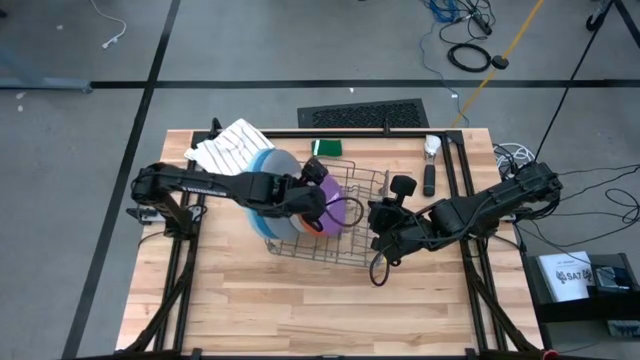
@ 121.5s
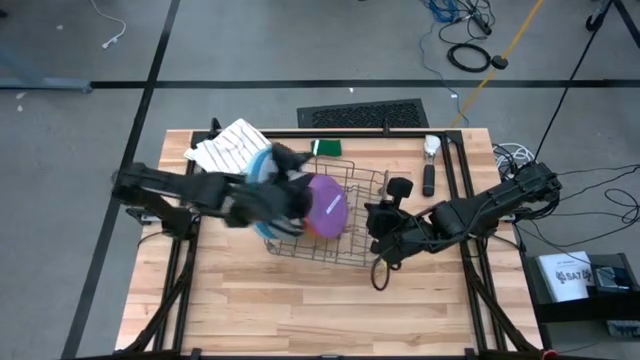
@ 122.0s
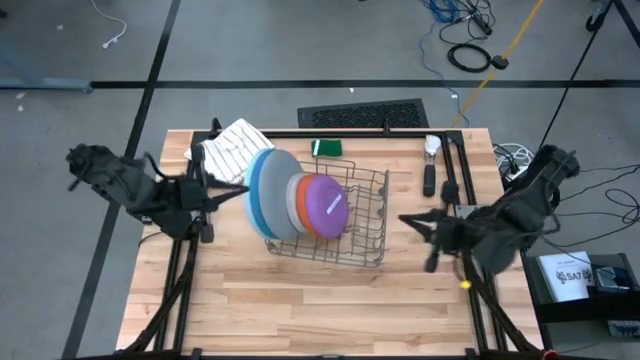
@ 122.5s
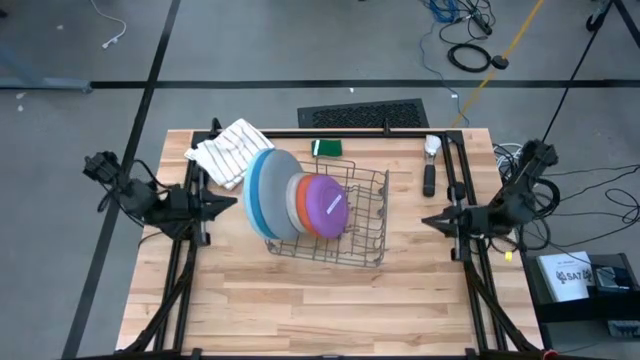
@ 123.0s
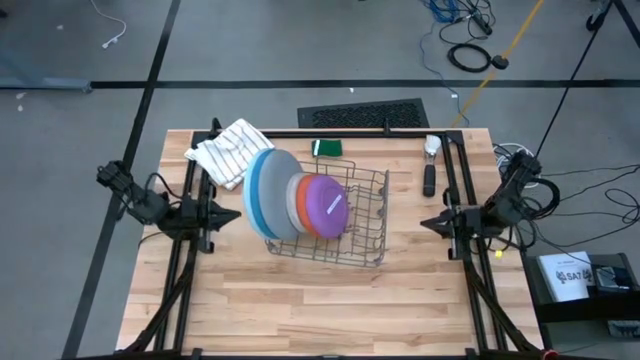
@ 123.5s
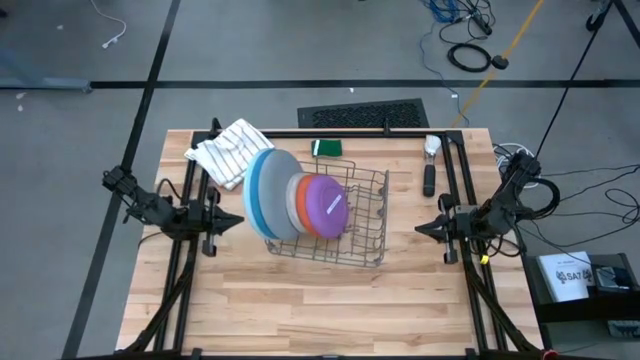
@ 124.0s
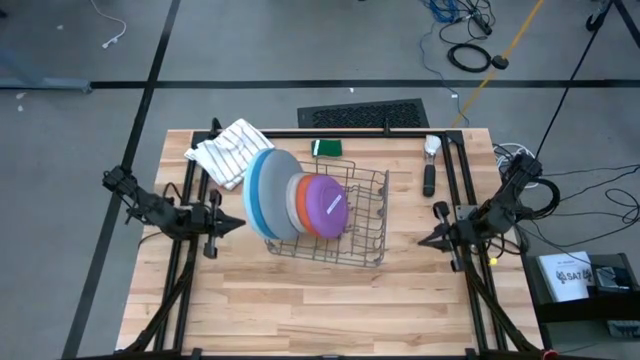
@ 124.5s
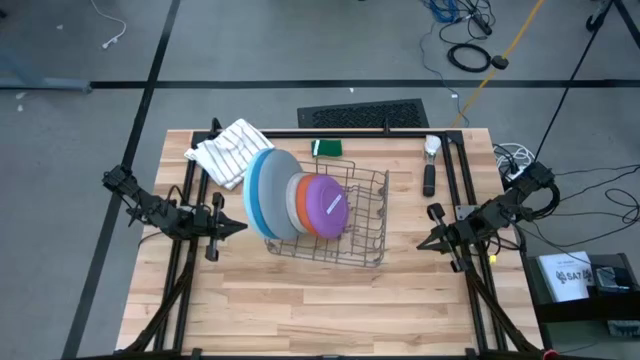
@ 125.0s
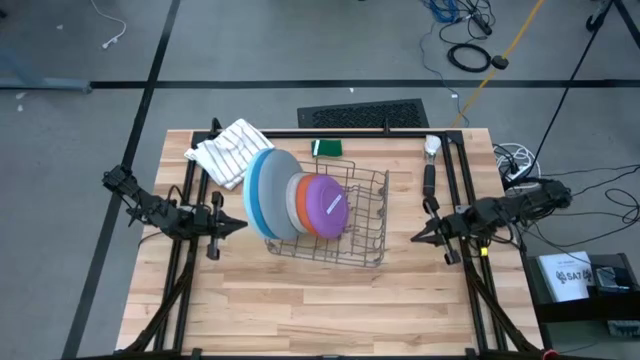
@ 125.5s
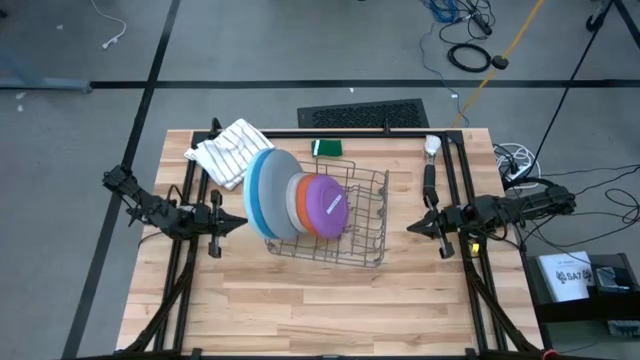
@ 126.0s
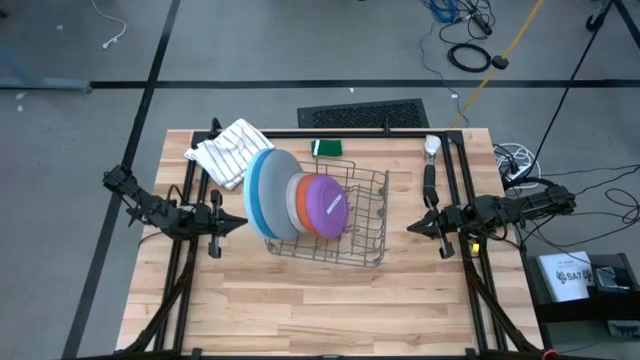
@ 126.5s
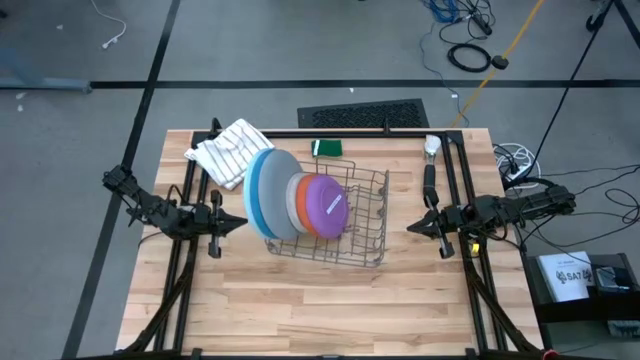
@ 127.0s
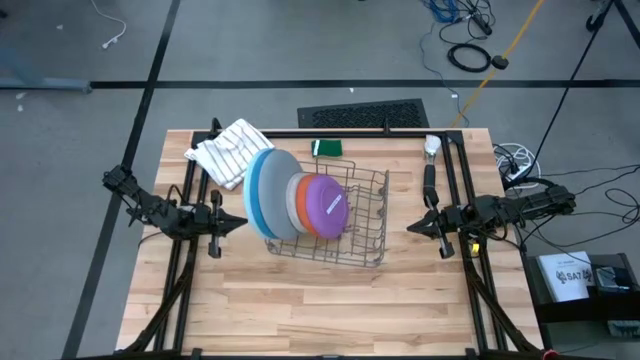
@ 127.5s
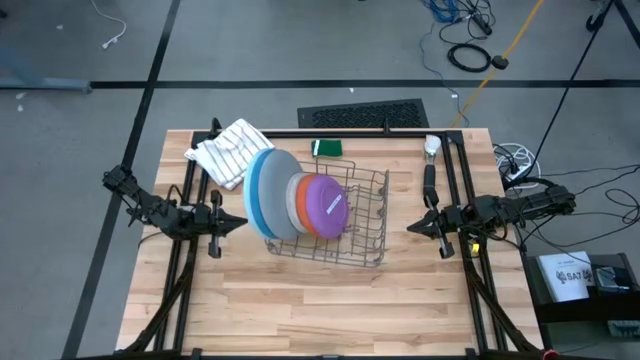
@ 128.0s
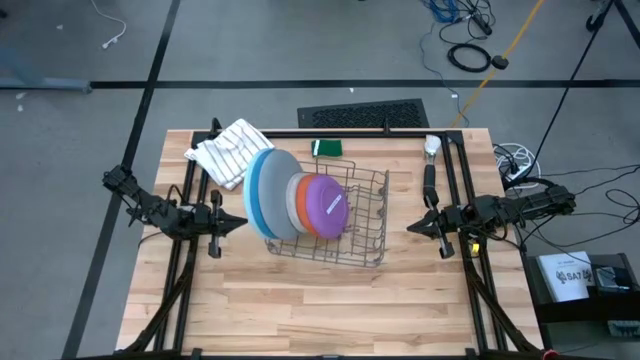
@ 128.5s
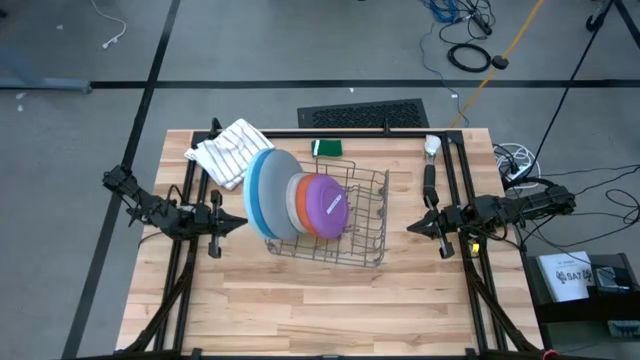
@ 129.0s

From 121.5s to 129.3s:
Task: Sort dishes
Return to Home Position

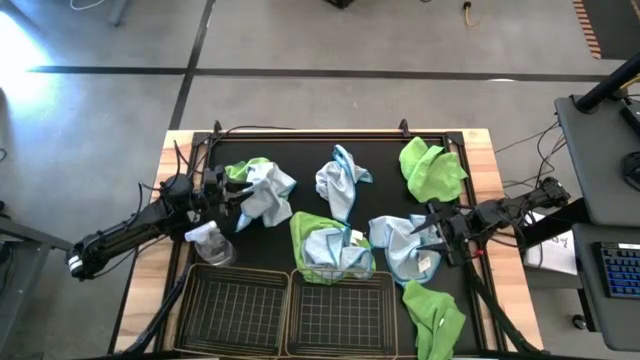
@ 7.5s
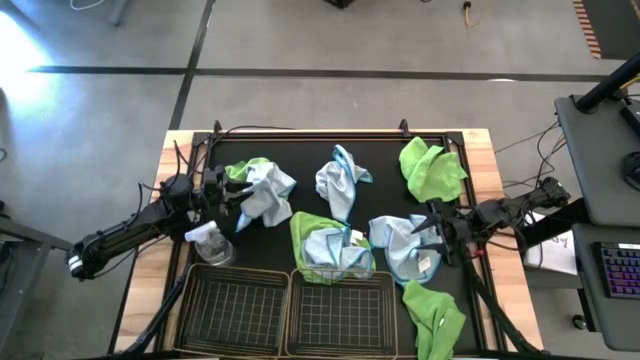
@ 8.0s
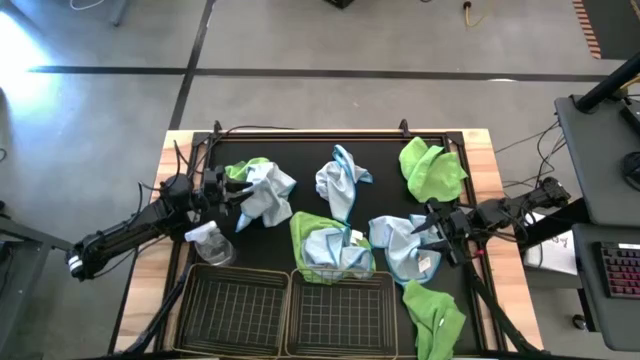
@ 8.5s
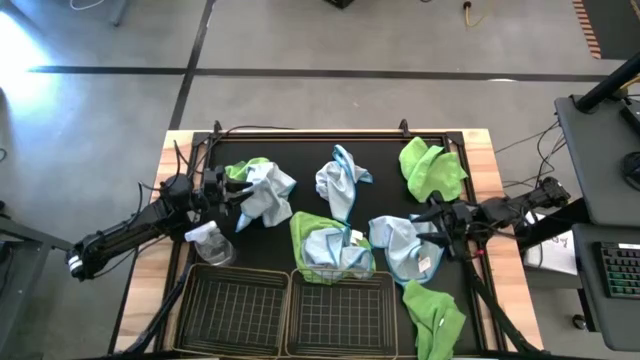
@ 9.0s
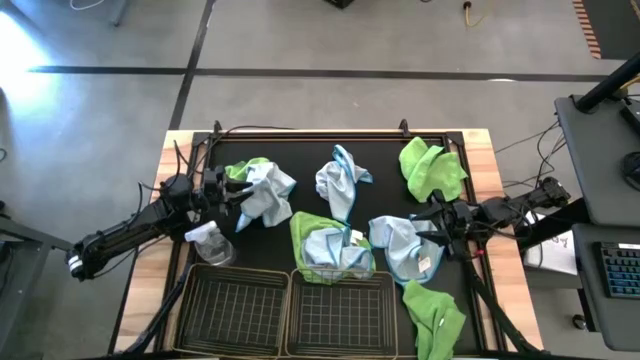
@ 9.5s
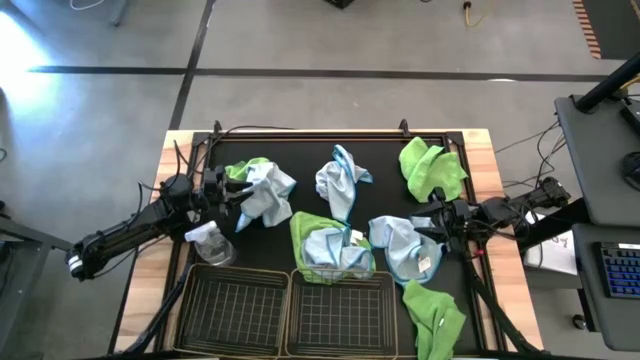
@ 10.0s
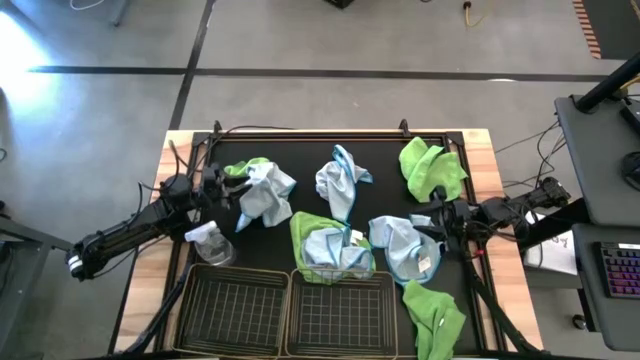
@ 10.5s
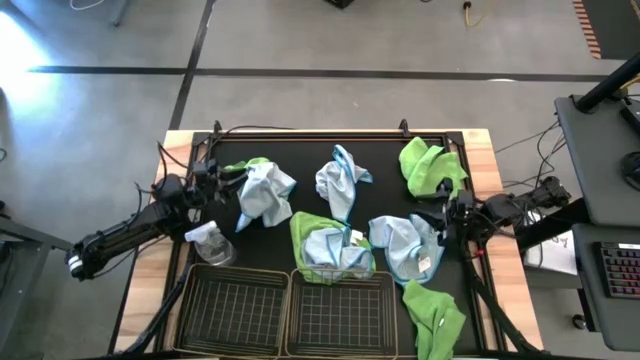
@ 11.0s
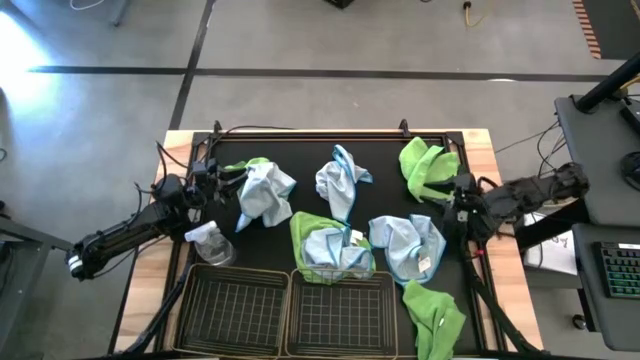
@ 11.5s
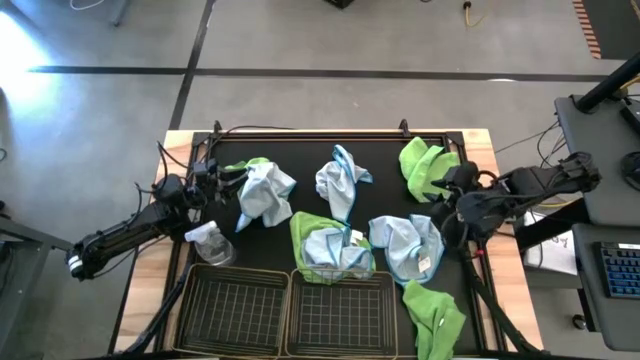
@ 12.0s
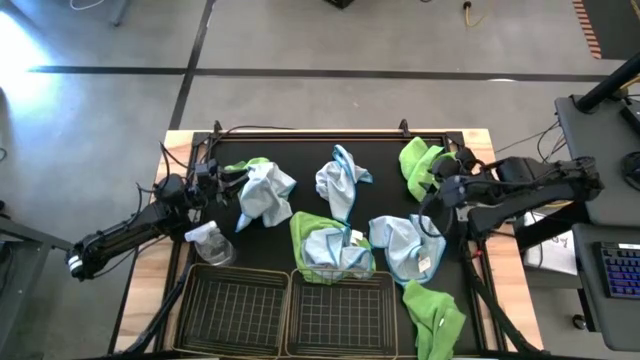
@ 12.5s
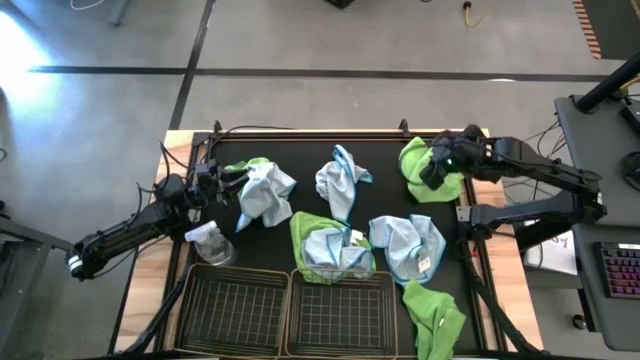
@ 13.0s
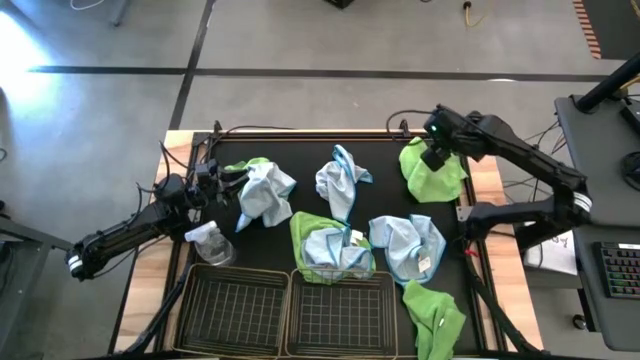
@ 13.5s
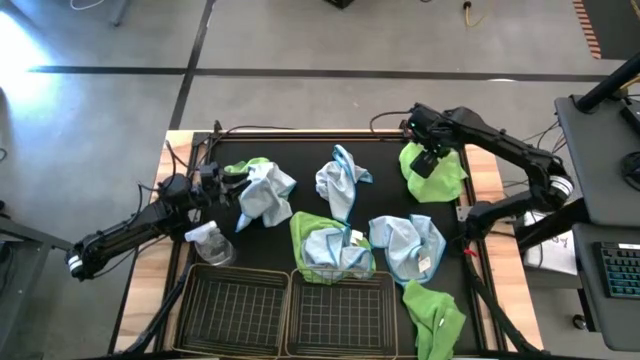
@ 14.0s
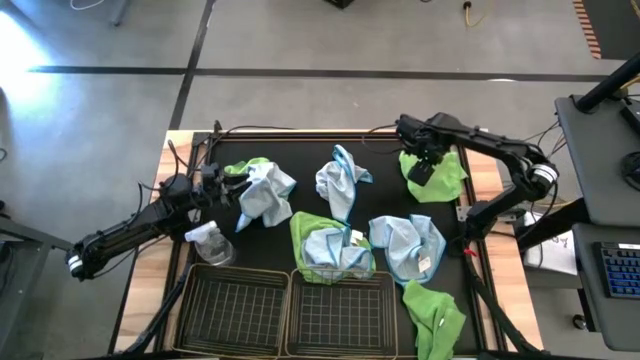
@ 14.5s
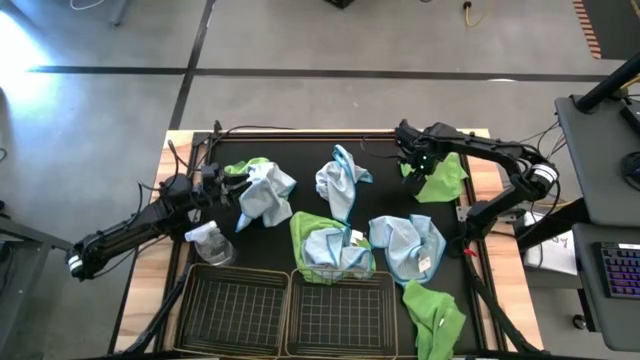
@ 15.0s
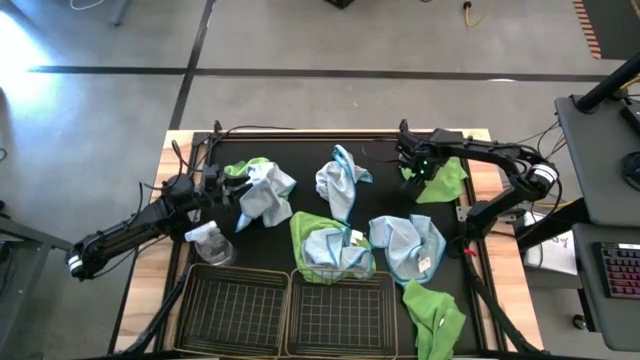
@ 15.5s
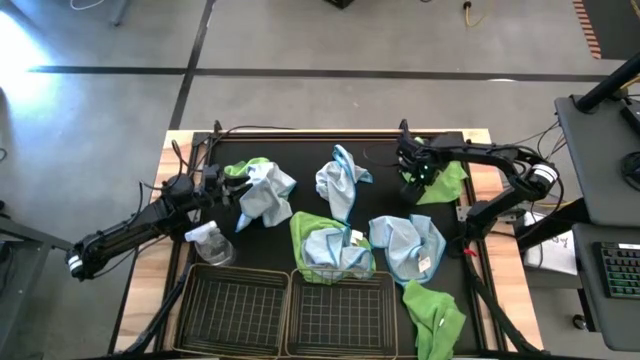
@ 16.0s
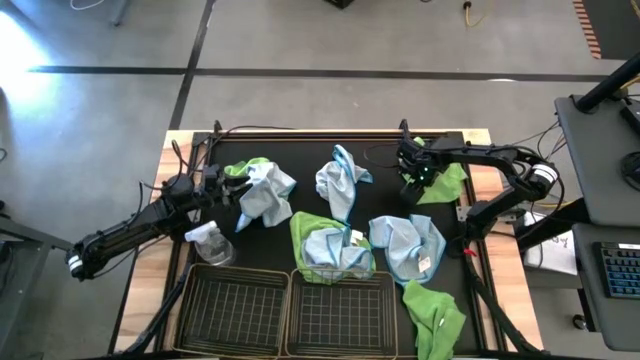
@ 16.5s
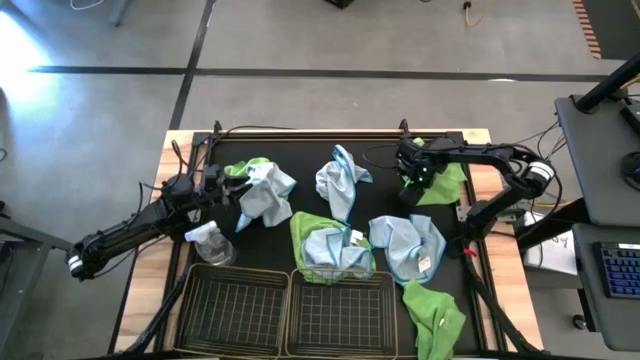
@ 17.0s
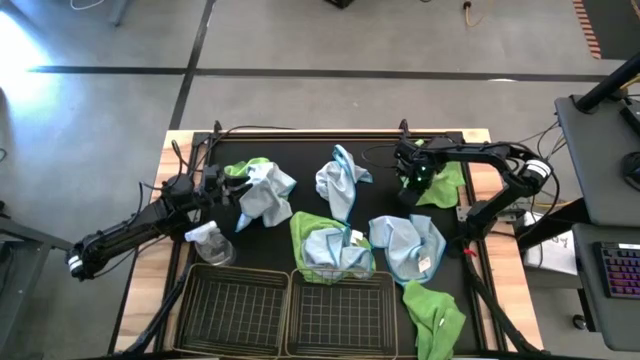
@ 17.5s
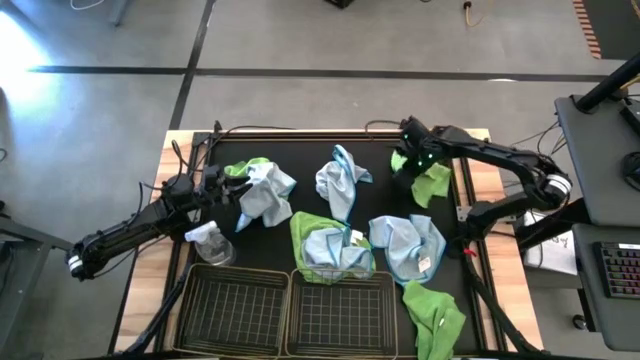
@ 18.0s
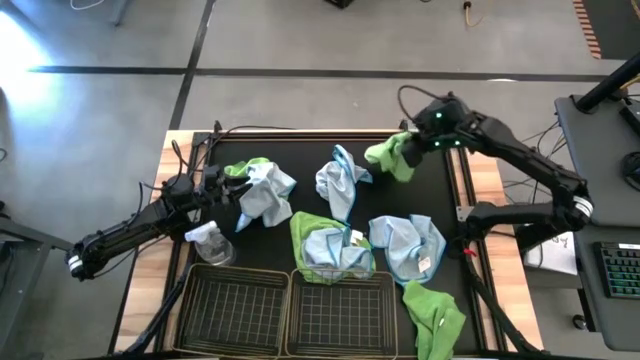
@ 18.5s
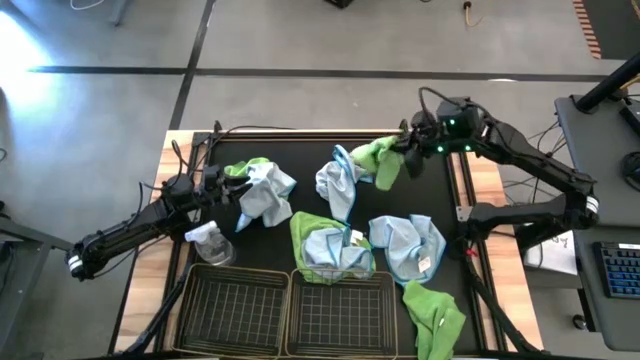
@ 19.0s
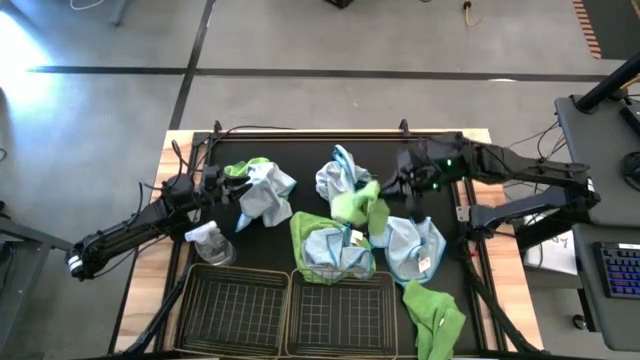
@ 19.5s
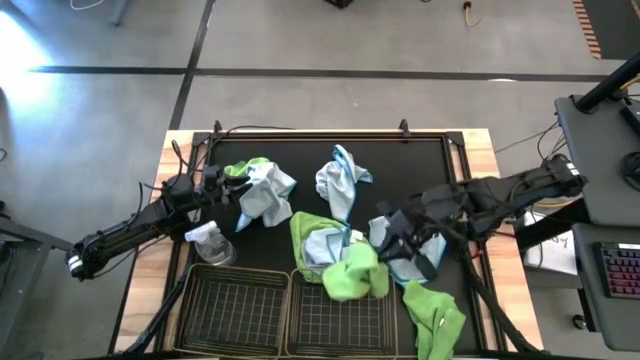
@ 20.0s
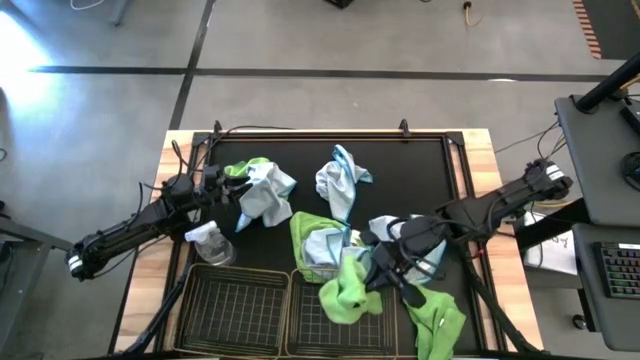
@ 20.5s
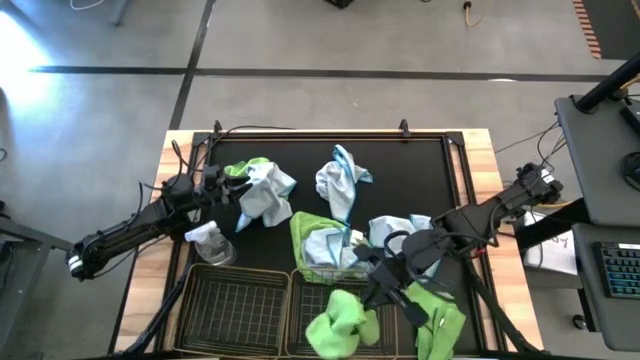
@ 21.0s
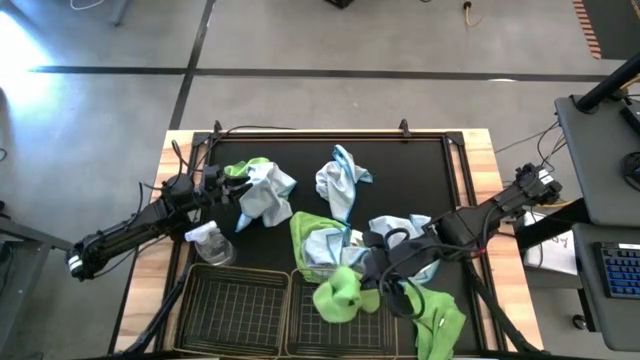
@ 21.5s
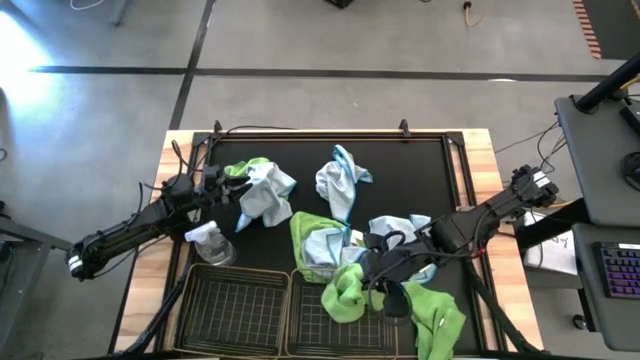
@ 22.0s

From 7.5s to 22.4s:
Task: Sort microfiber towel by color & place in baskets
Put the top right green towel into the right wire basket
